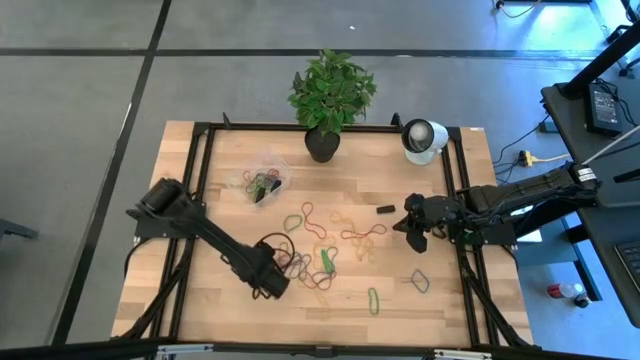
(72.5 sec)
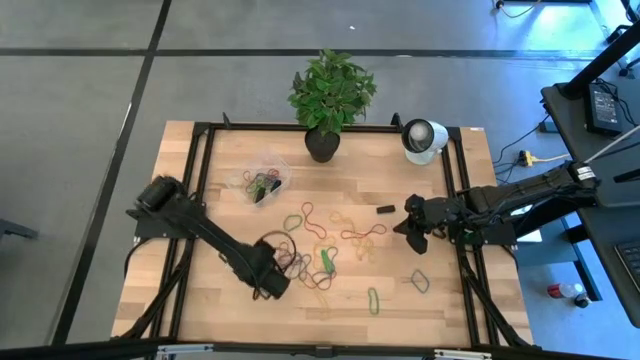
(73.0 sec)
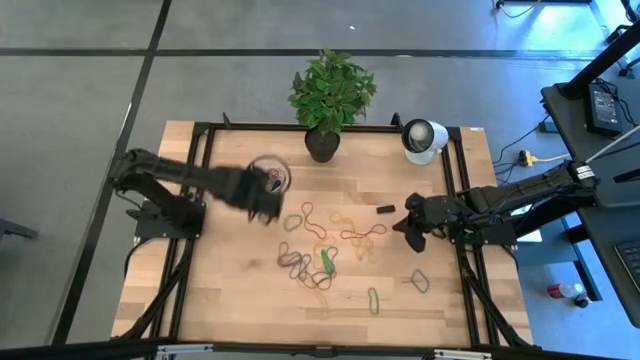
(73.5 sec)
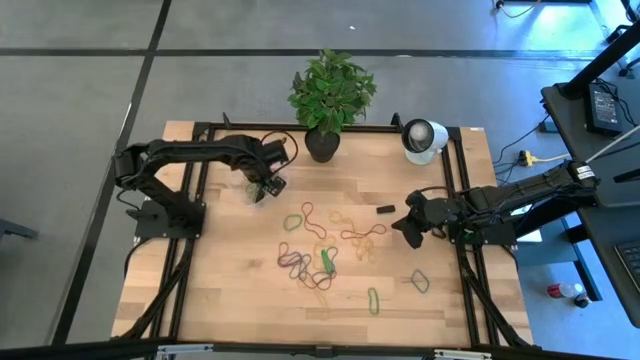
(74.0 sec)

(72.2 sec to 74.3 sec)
Task: Pick and place rubber bands into bin
Put the green rubber band into the transparent bin

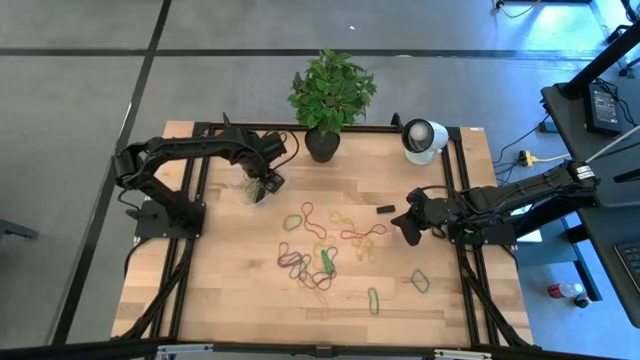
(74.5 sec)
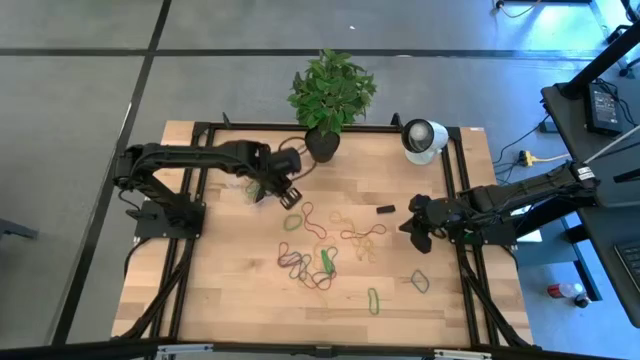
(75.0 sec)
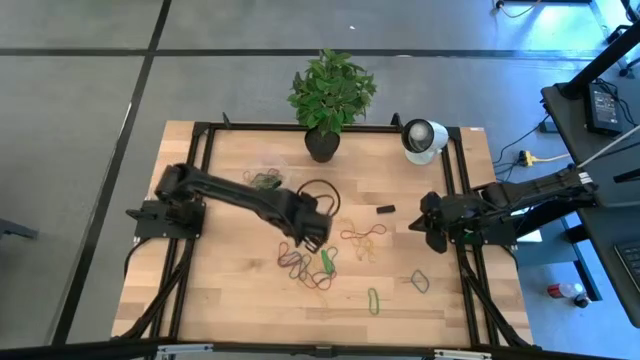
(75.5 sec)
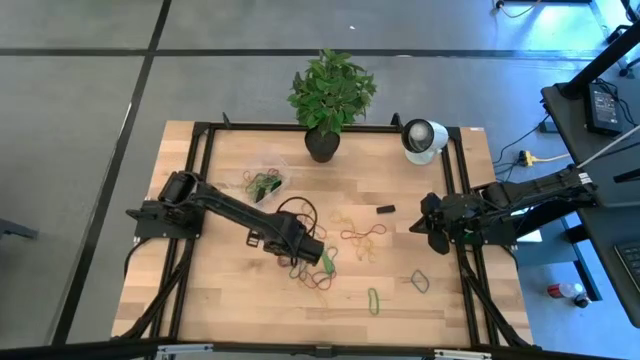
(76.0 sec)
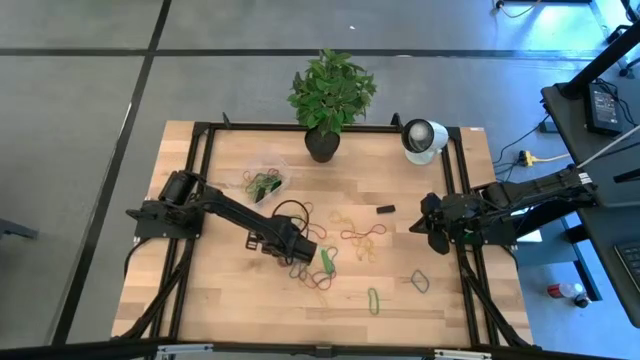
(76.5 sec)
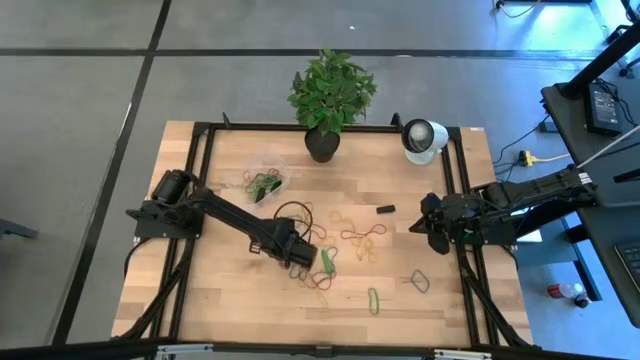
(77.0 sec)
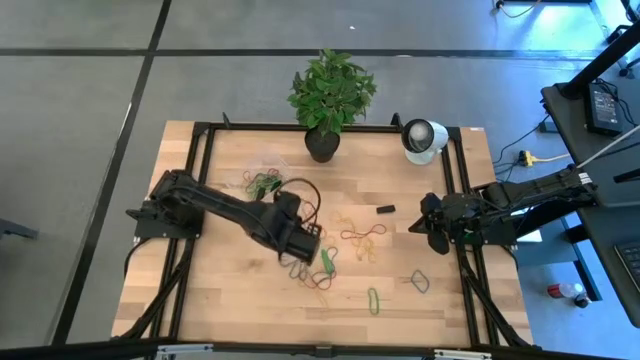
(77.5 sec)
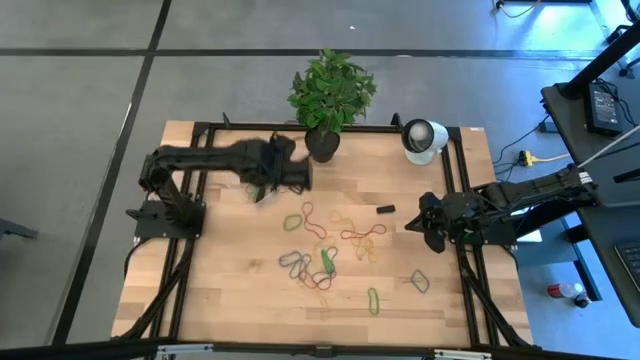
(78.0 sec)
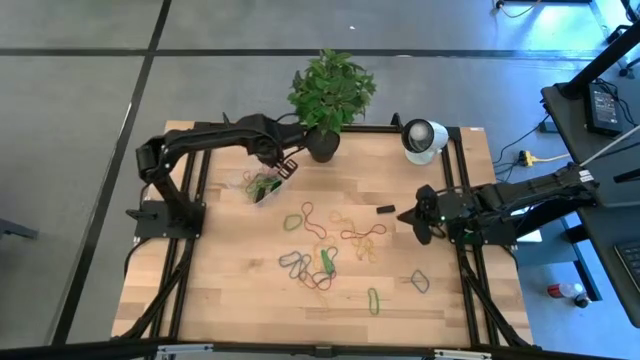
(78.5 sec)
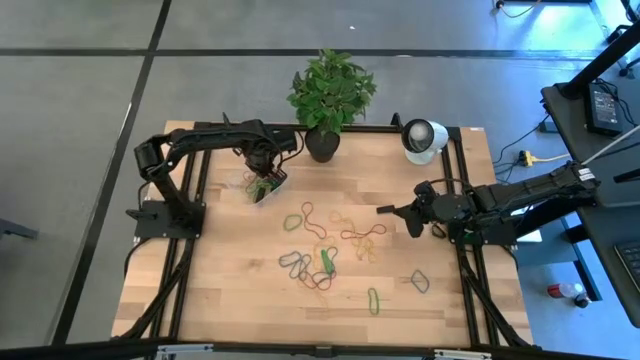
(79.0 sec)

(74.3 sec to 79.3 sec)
Put the red rubber band into the transparent bin

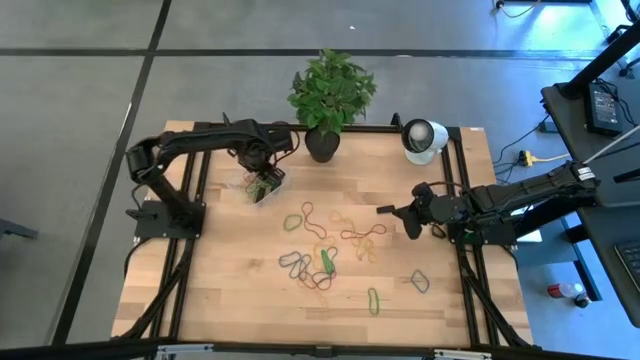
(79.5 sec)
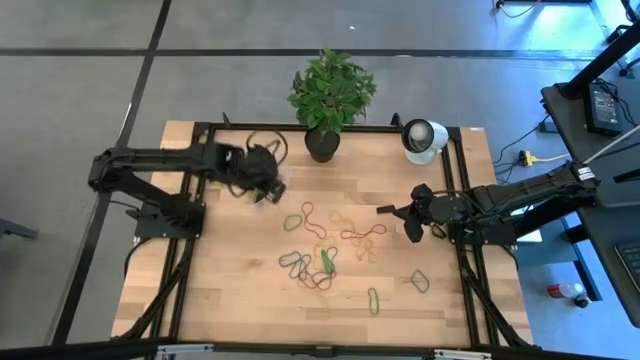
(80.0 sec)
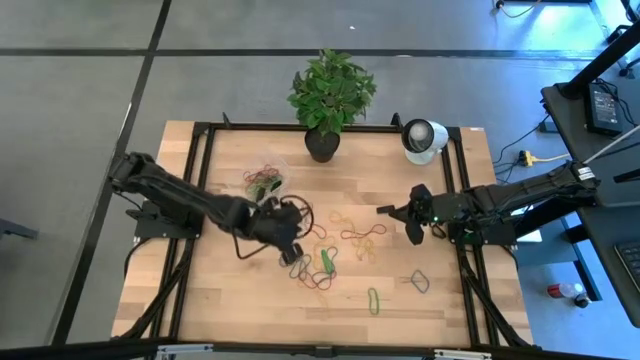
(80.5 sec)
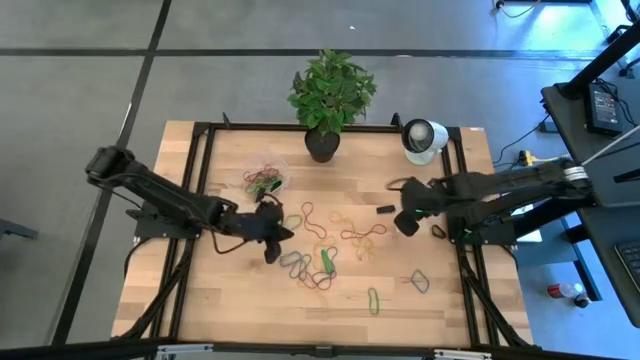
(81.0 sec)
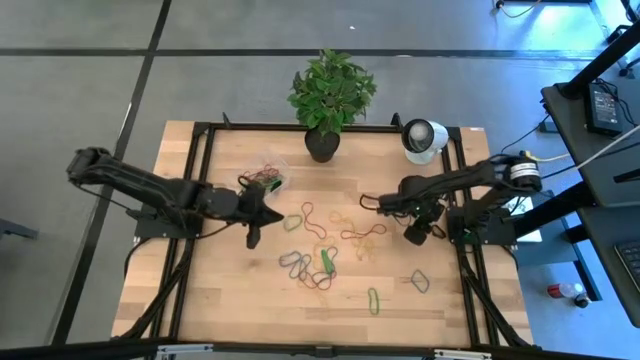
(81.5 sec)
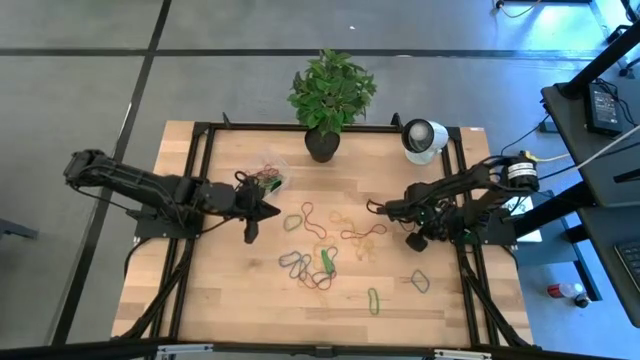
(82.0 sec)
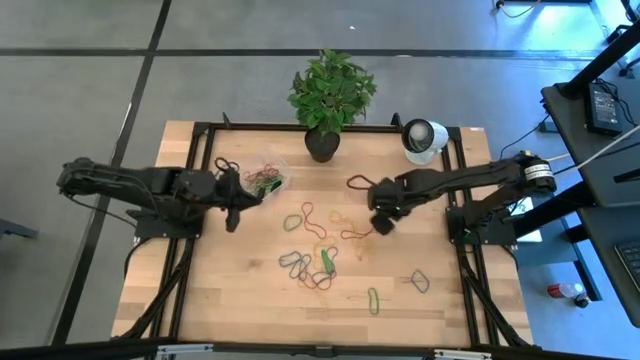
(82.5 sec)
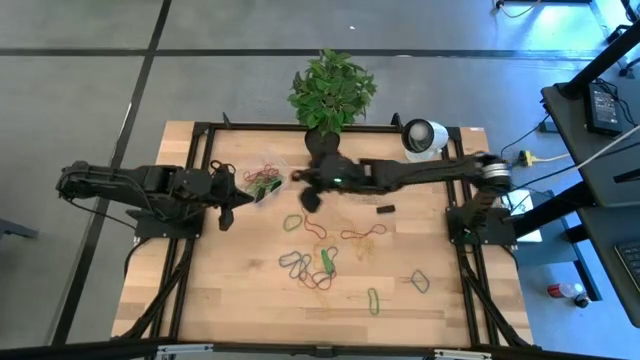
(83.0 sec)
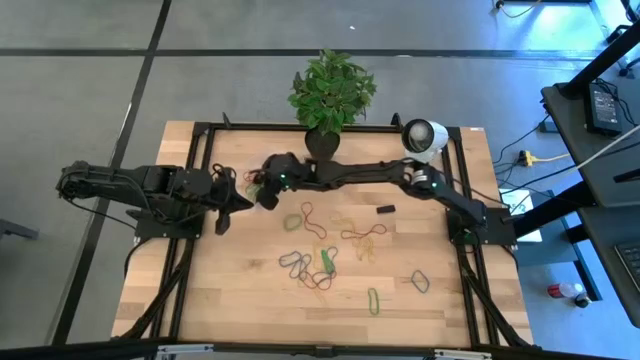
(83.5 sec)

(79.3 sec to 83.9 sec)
Put the black rubber band into the transparent bin

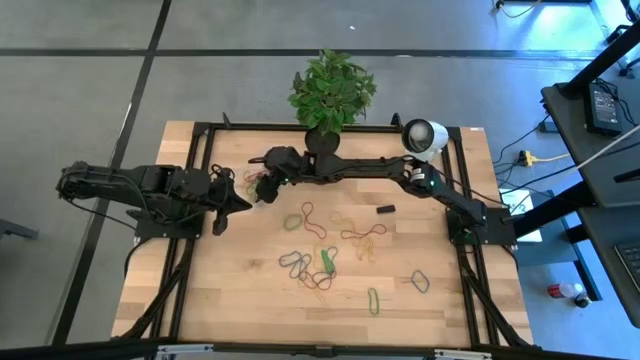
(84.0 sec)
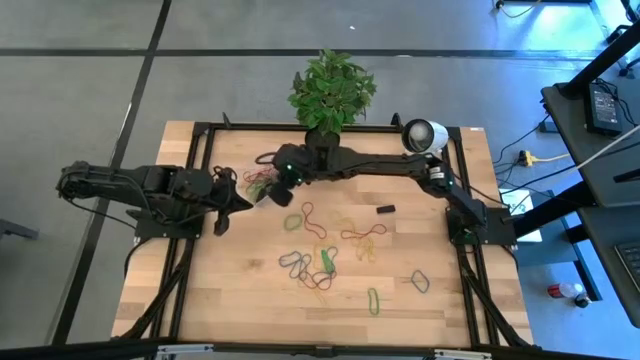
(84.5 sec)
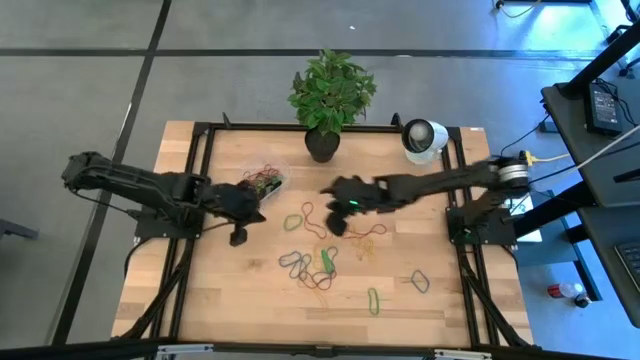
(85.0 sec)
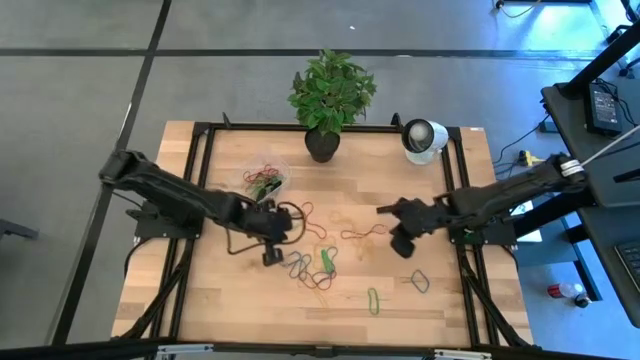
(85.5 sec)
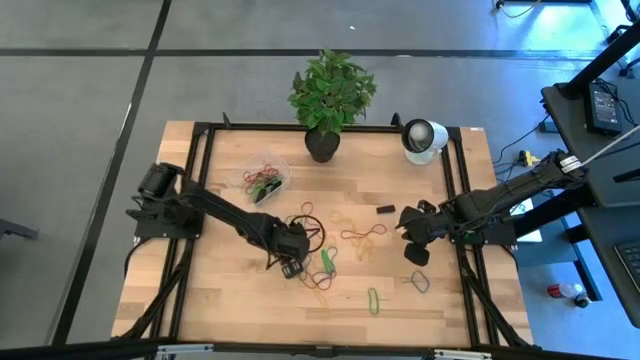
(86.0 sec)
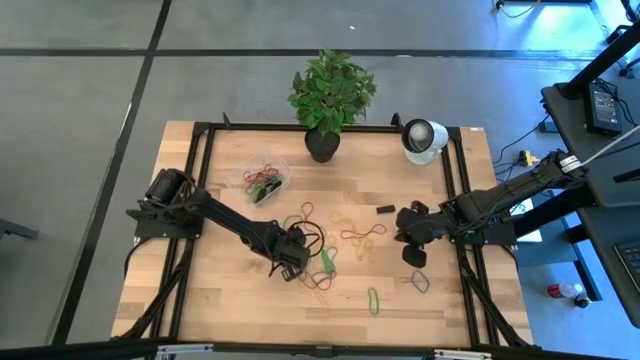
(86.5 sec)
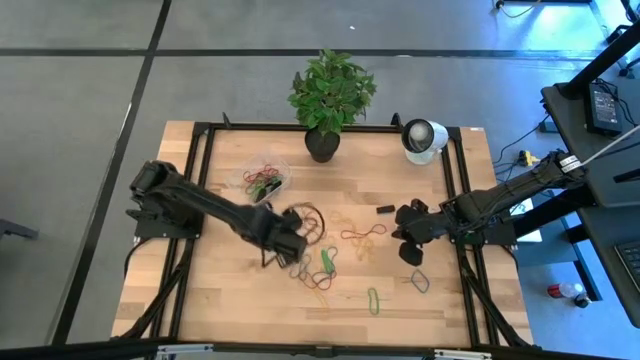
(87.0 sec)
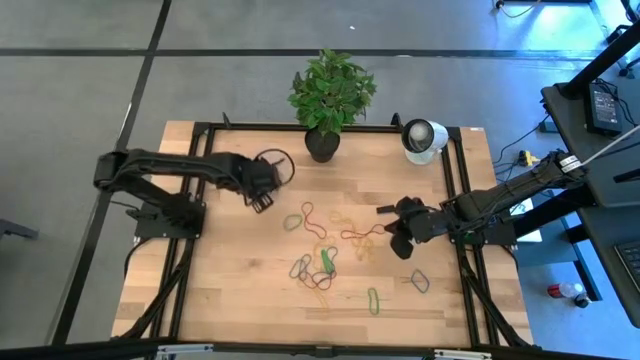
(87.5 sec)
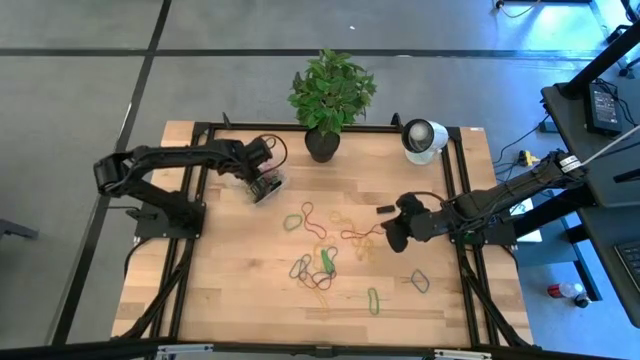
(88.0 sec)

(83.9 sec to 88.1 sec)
Put the blue rubber band into the transparent bin

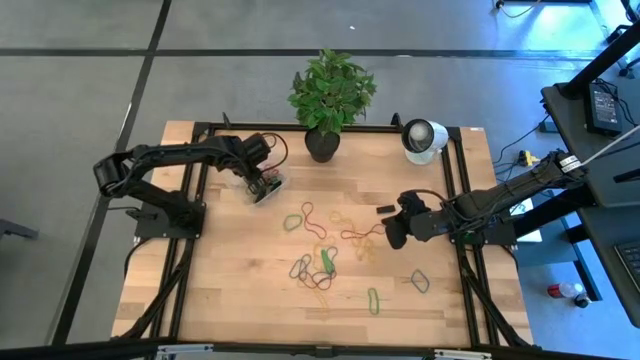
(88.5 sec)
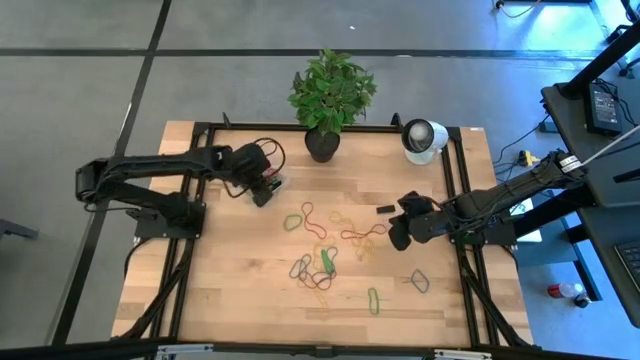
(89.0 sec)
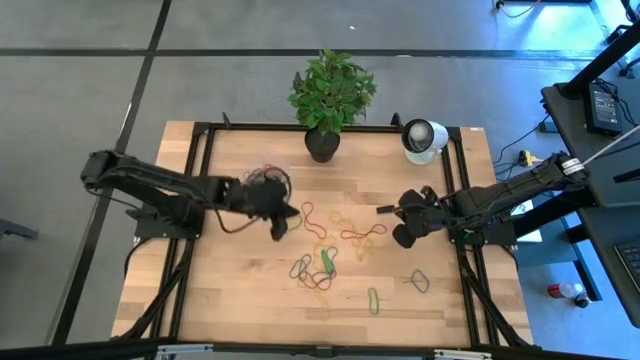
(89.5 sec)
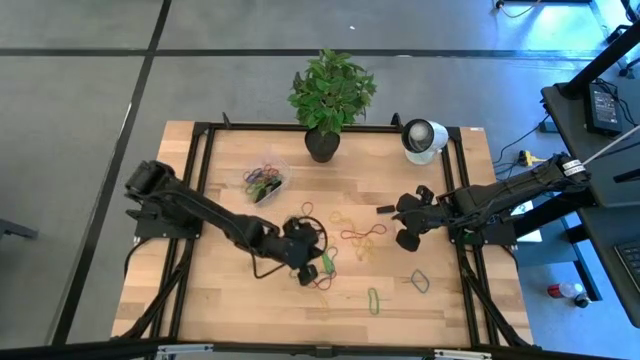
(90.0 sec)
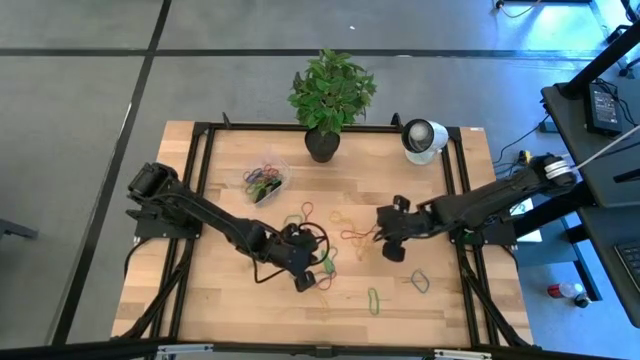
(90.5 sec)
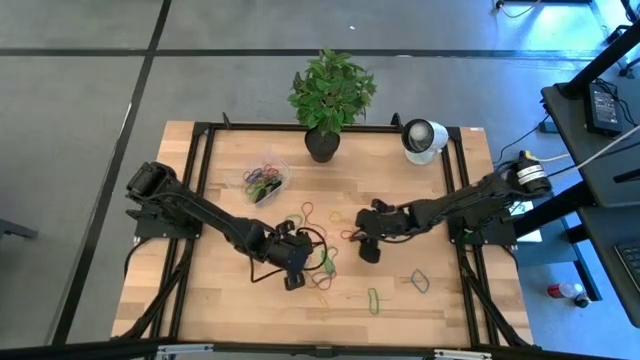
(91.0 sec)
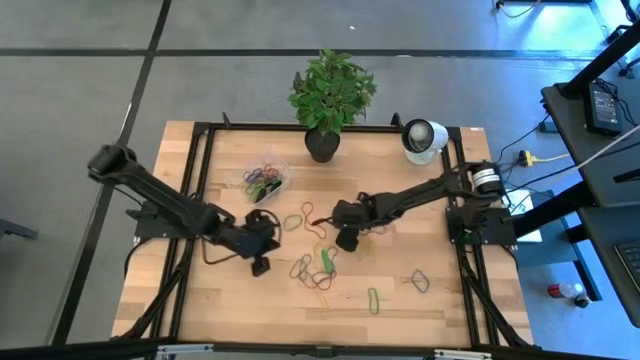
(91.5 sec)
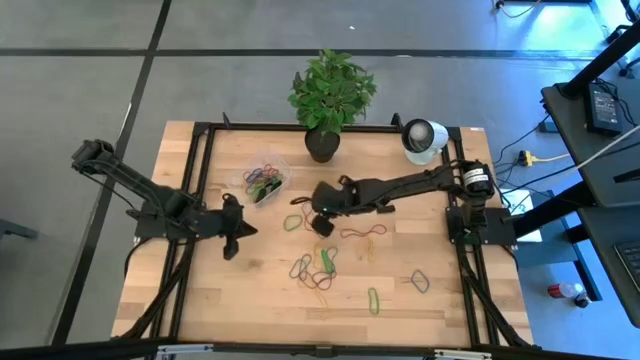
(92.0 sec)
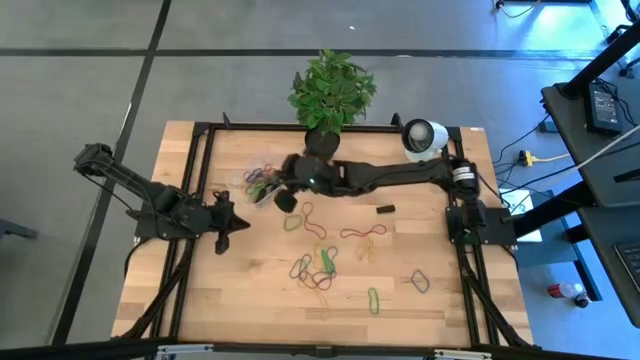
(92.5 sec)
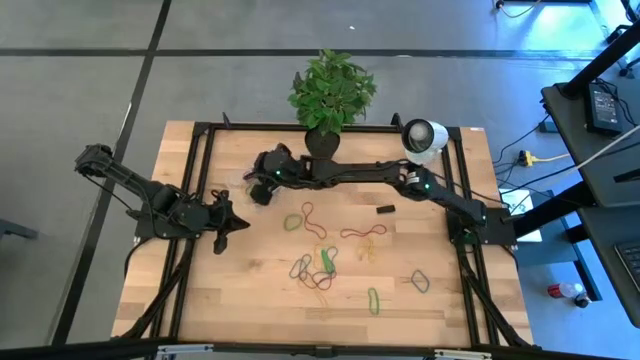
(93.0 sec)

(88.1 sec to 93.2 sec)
Put the yellow rubber band into the transparent bin
